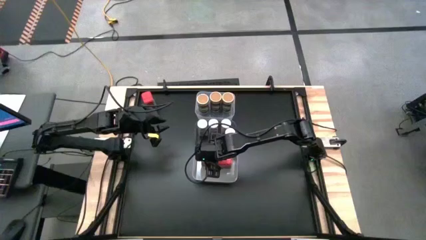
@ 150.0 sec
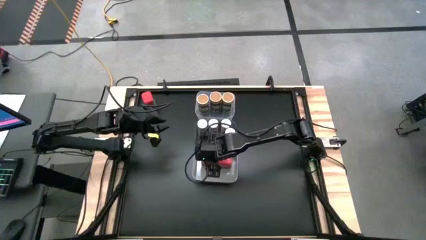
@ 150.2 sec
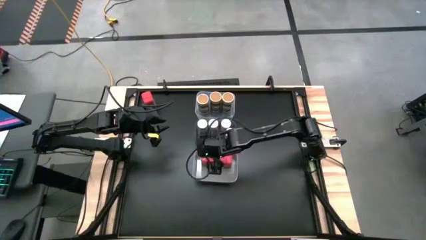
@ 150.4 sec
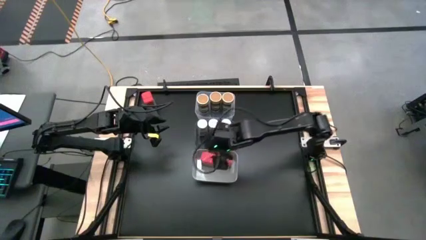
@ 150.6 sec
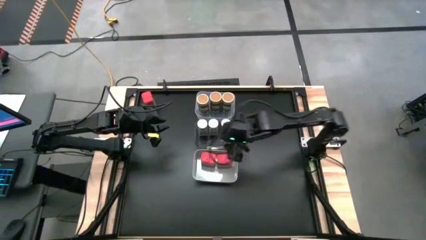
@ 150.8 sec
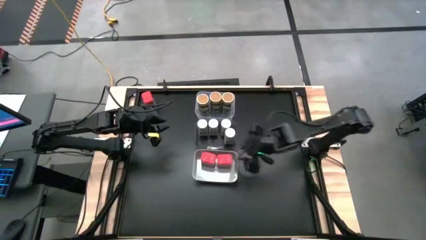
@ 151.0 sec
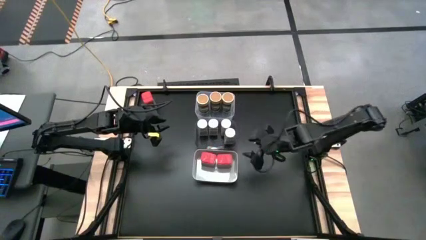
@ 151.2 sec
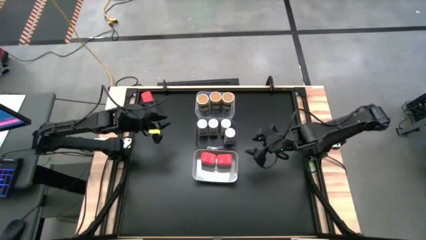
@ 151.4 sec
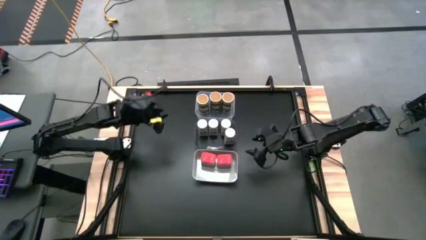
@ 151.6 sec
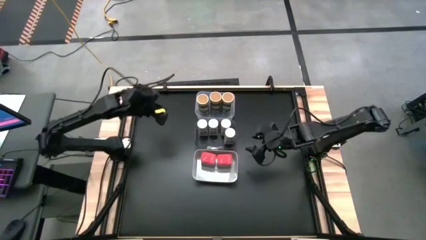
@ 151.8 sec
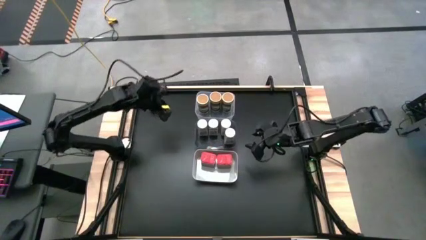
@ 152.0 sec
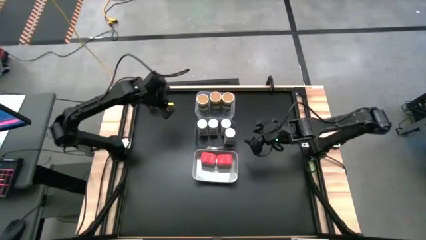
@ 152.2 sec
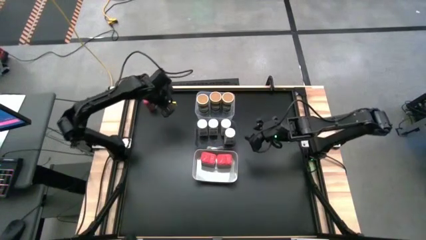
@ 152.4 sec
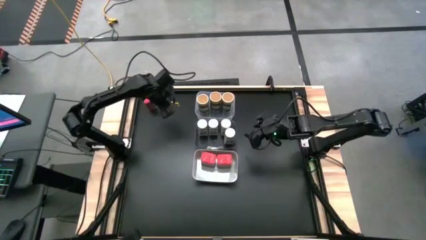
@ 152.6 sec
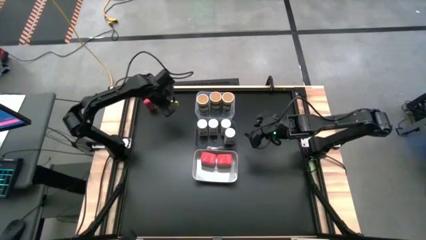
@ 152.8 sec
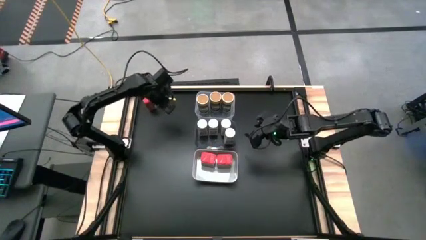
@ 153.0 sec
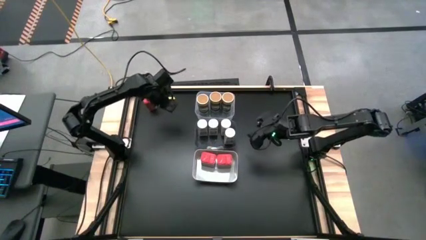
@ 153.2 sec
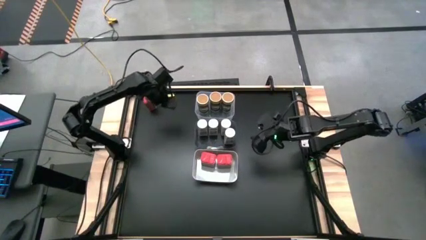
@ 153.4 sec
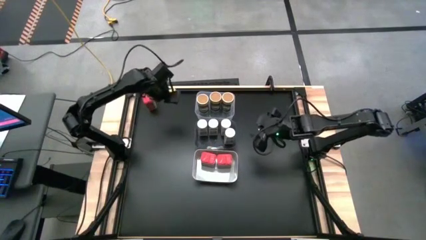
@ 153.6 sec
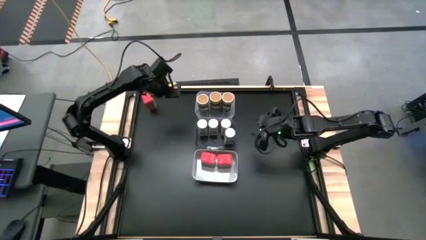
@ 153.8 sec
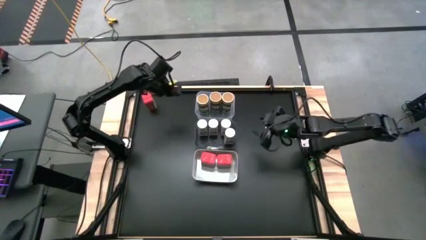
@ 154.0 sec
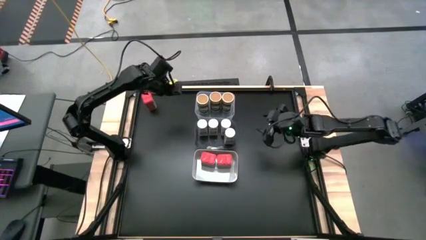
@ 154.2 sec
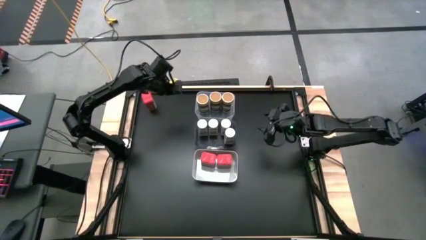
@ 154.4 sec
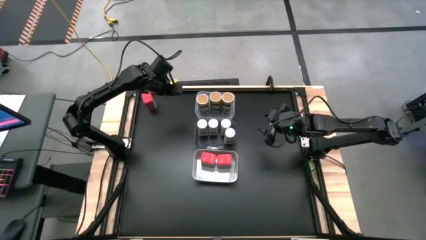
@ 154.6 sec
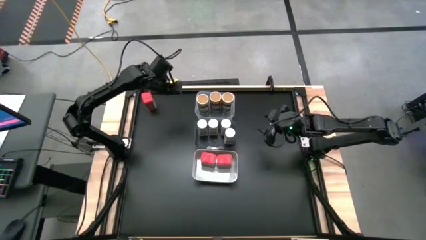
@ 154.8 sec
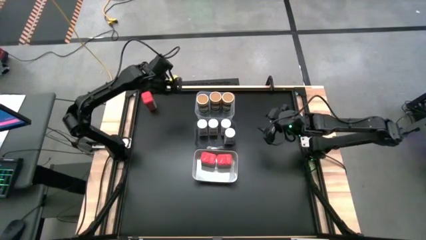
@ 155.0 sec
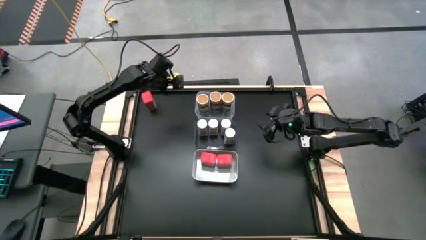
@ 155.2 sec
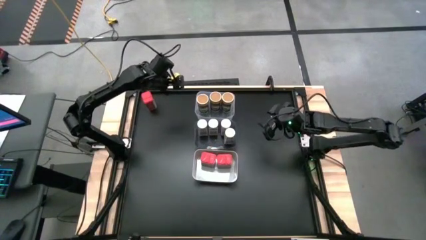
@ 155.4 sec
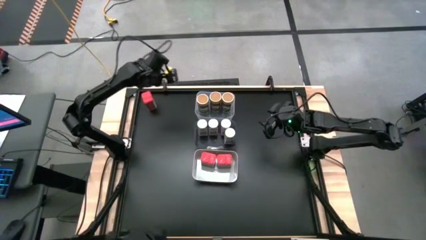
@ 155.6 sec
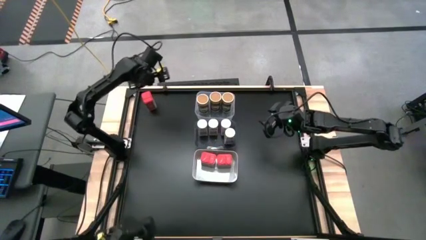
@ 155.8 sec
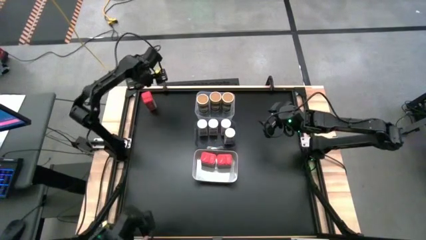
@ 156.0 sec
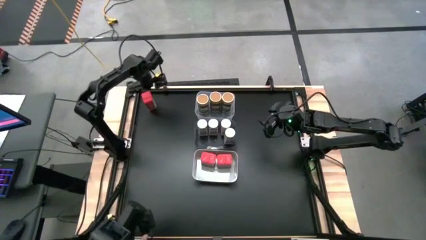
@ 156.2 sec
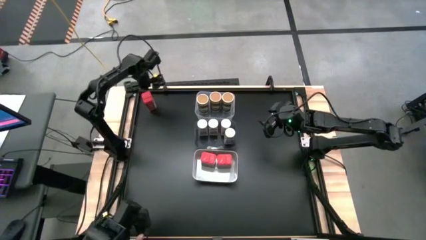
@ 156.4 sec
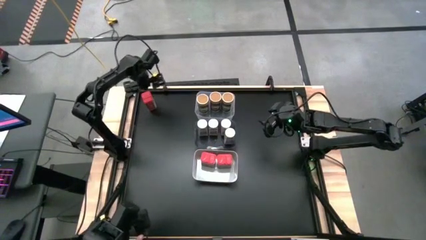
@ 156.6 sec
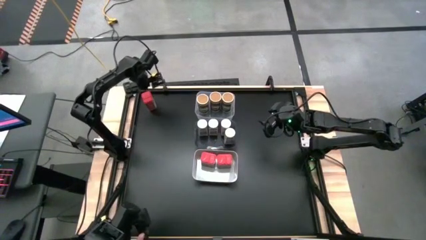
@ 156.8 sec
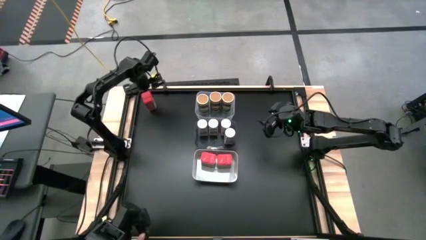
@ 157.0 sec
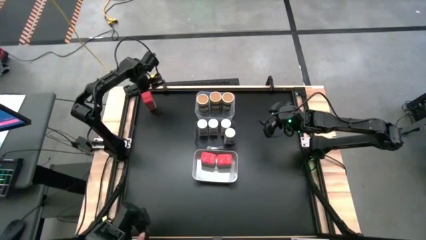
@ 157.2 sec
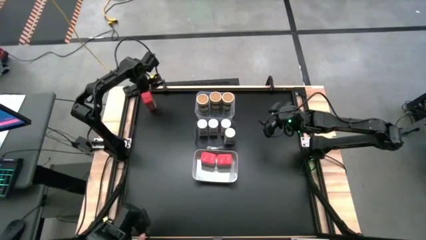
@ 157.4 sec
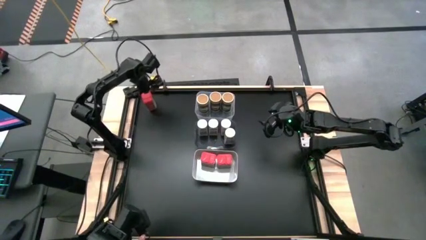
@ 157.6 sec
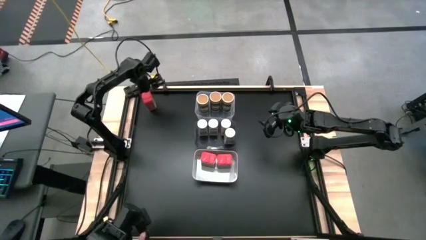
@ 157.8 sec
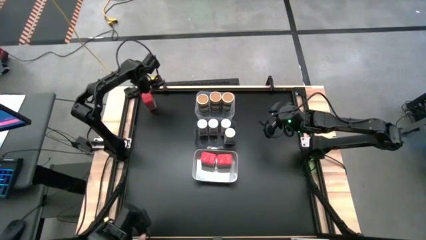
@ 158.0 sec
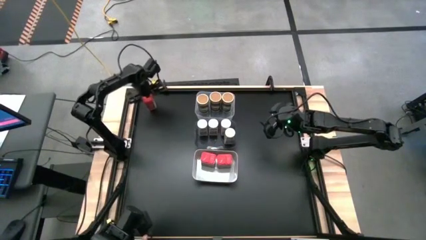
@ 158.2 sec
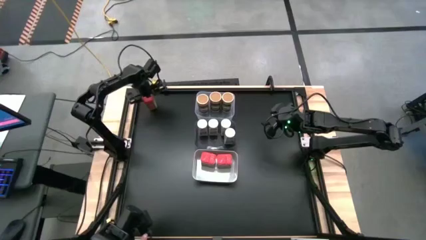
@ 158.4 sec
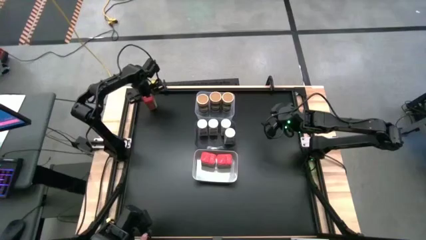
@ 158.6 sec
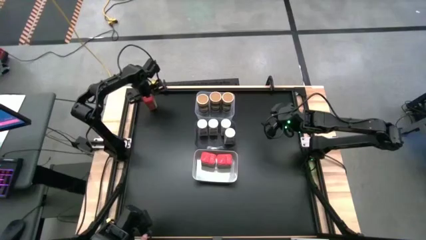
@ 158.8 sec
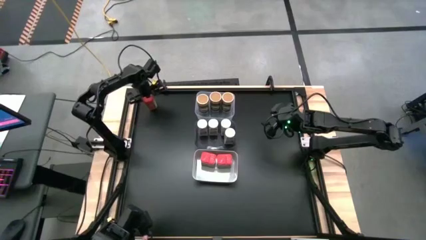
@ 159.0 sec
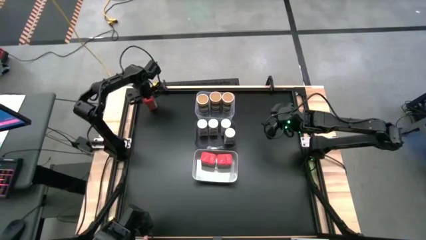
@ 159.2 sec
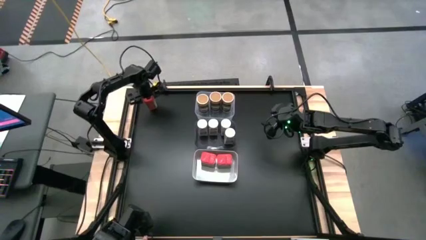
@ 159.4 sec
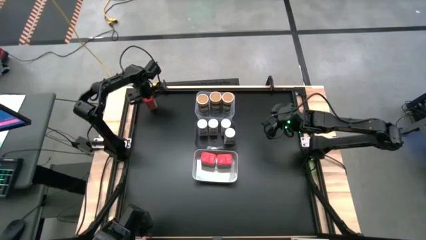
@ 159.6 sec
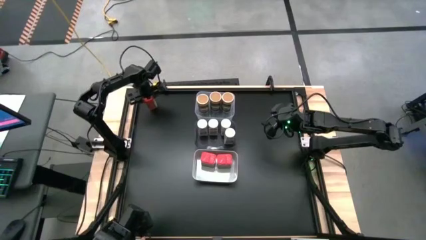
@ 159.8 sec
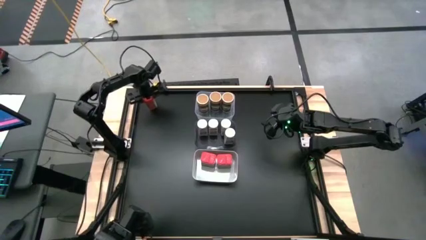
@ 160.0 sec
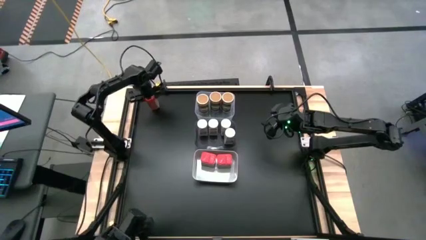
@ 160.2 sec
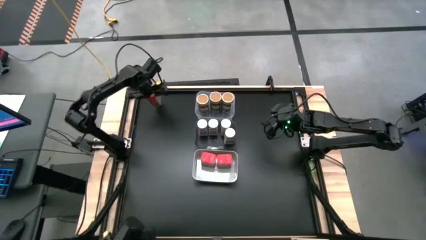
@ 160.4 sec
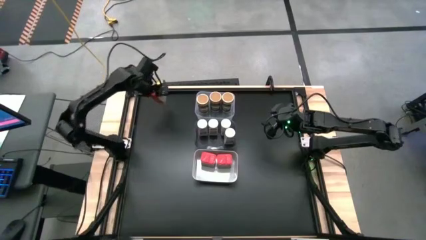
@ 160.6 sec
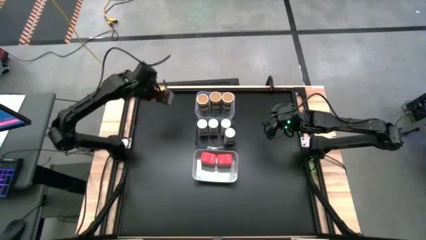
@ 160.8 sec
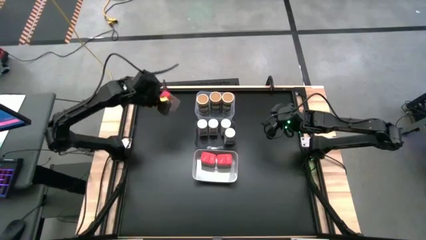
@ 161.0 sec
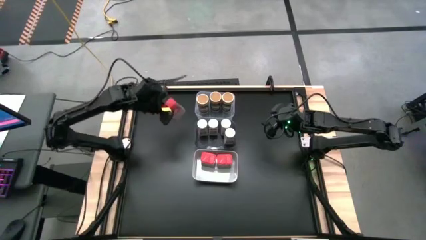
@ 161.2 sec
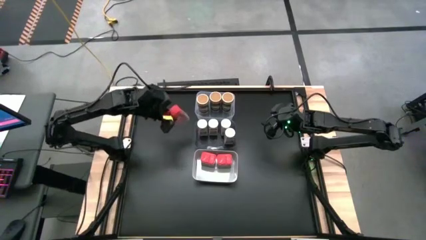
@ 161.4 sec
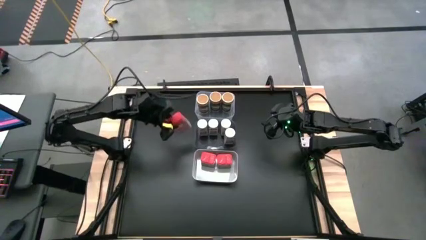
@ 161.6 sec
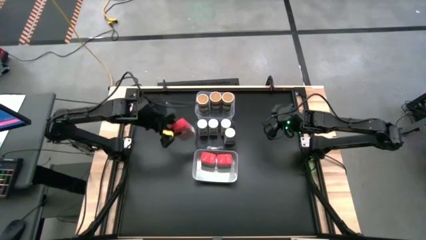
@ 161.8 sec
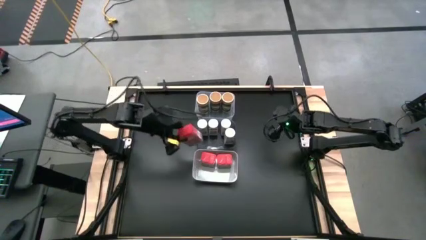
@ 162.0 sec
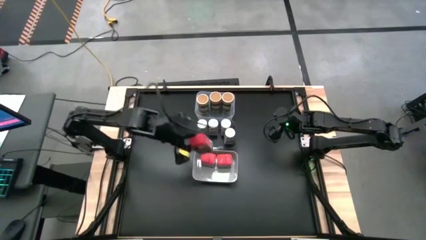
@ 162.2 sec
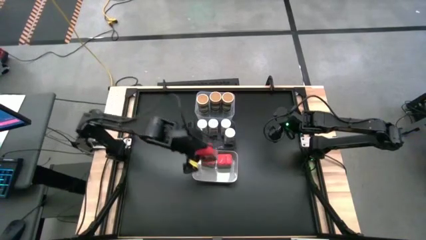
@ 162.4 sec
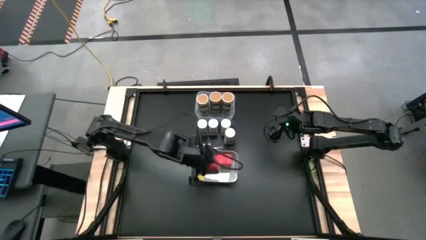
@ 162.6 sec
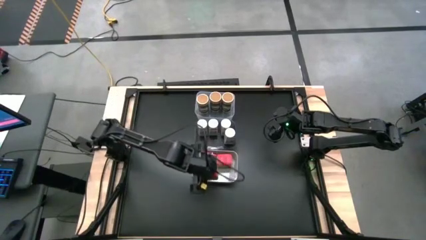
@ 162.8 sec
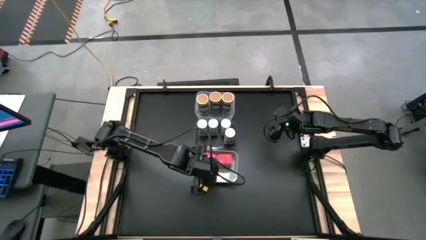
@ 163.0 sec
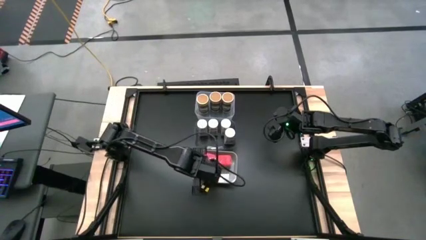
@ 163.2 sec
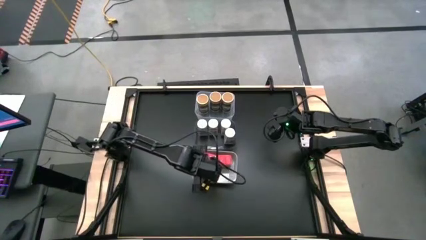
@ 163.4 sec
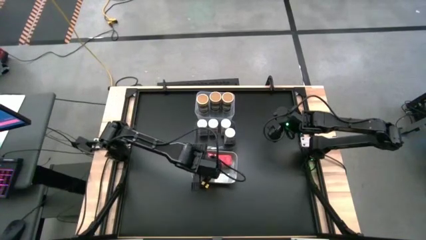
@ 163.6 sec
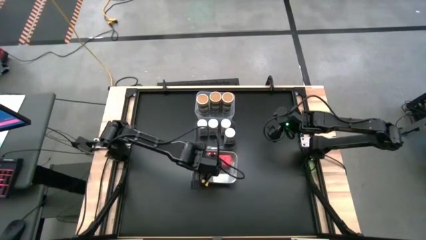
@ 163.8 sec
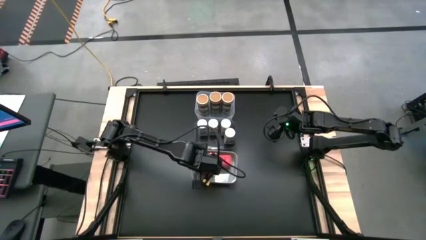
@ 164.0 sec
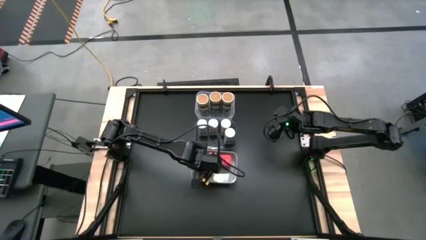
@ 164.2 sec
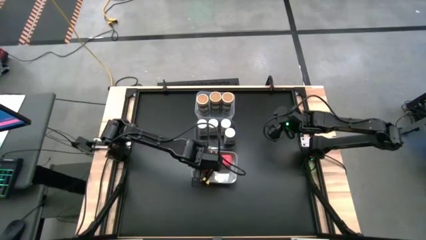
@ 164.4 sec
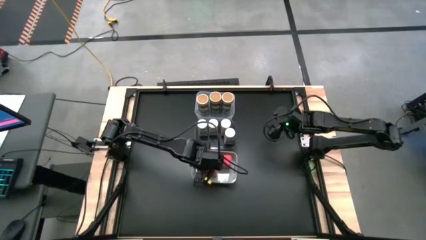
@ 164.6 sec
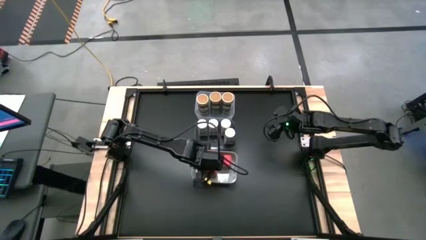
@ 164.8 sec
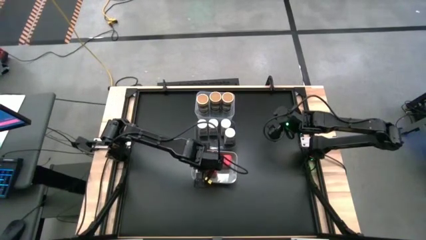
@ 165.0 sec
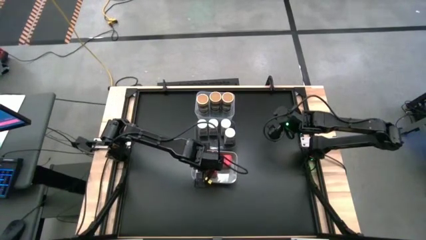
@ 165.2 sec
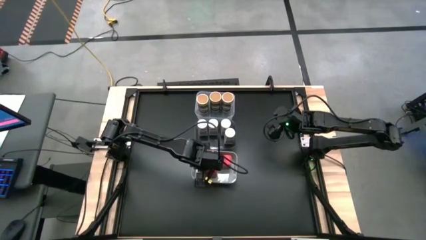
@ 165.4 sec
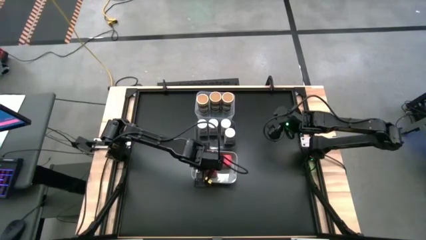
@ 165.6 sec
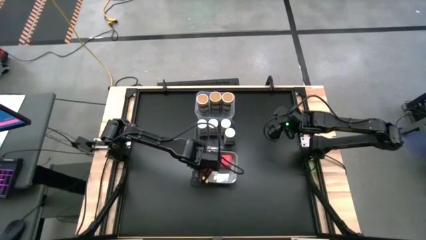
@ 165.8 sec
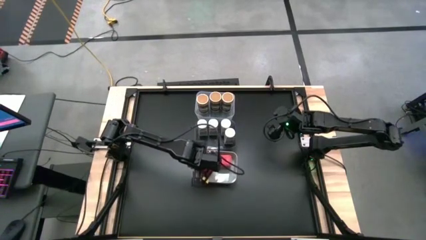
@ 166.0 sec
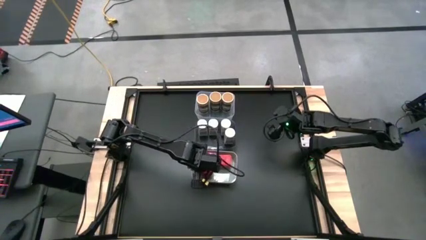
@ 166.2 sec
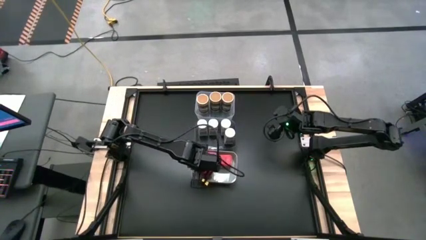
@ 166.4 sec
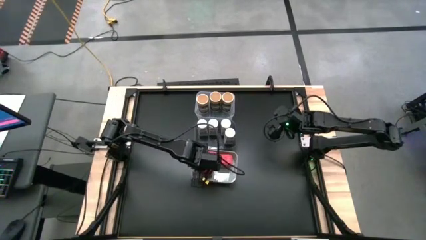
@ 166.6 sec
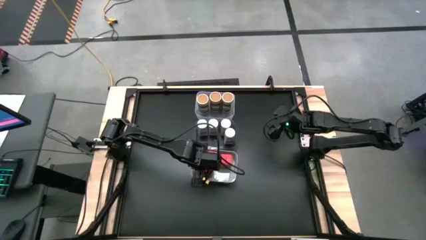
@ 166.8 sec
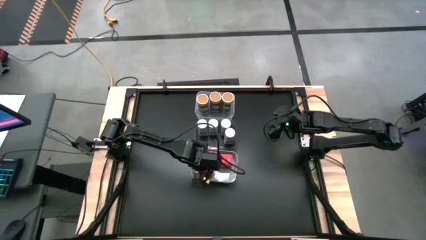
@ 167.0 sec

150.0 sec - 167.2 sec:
Task: Sort spices by type
Put the red seasoning can into the white bin in front of the other red seasoning can
